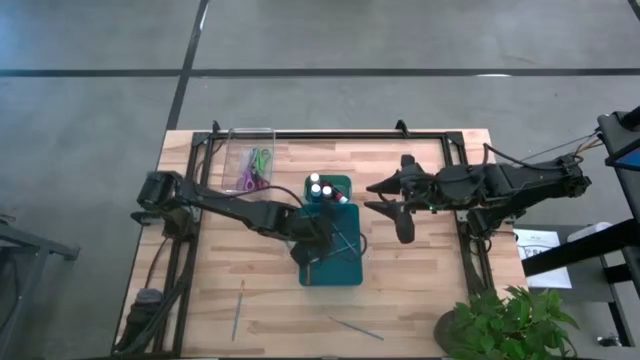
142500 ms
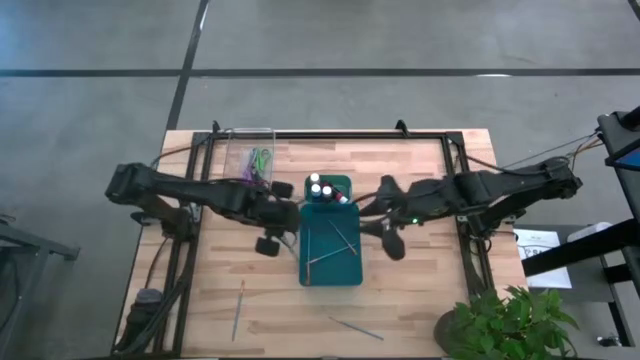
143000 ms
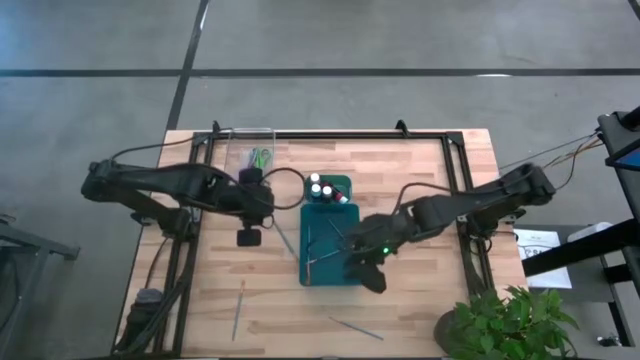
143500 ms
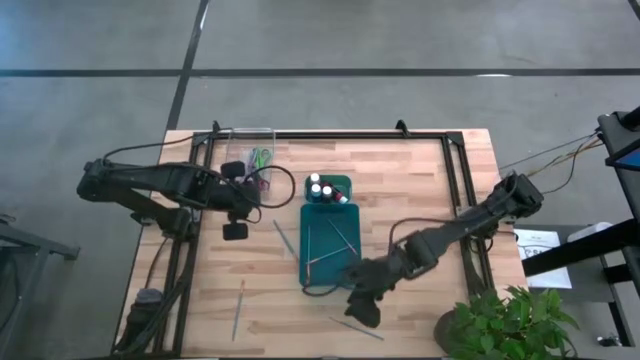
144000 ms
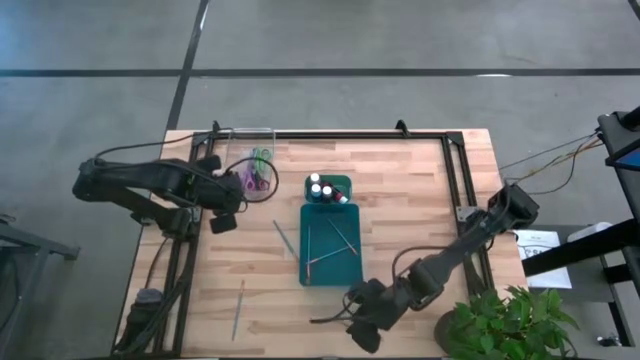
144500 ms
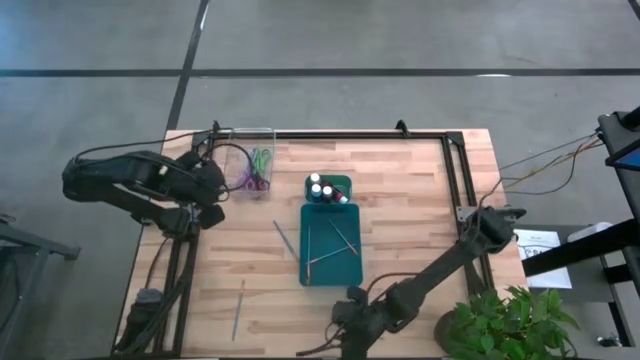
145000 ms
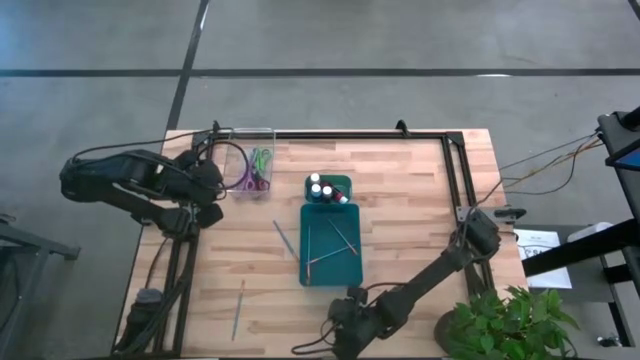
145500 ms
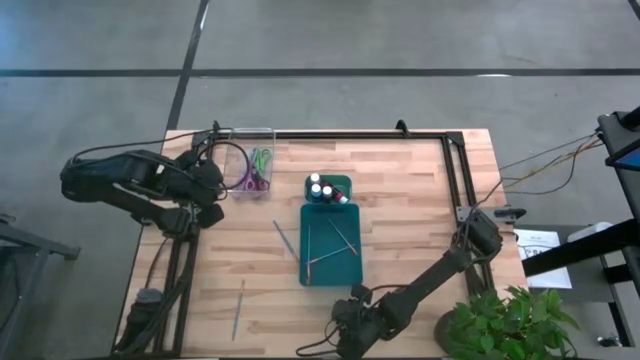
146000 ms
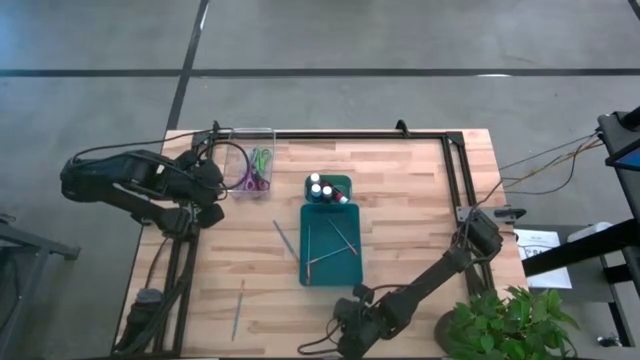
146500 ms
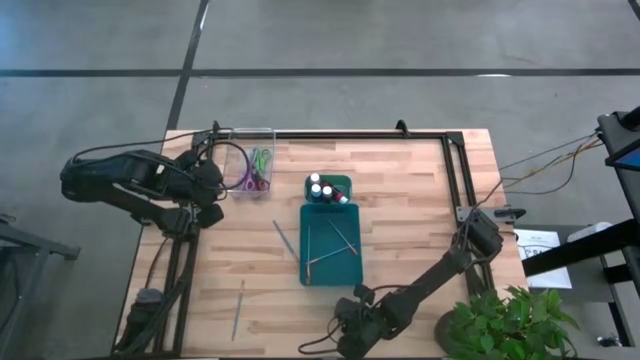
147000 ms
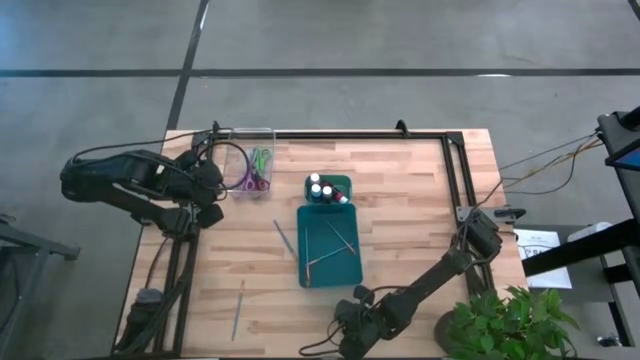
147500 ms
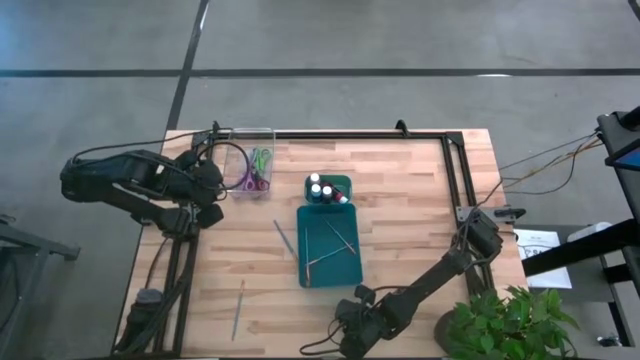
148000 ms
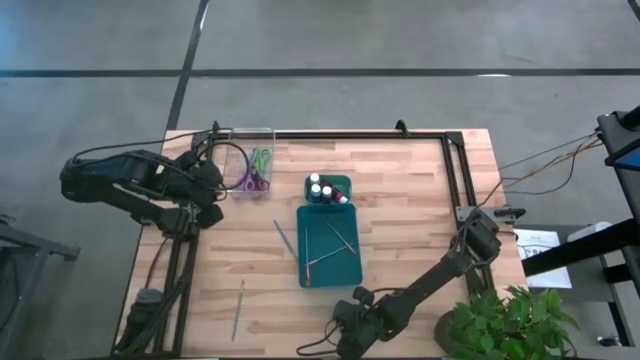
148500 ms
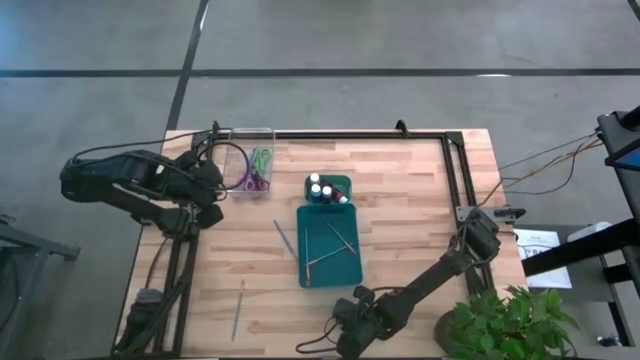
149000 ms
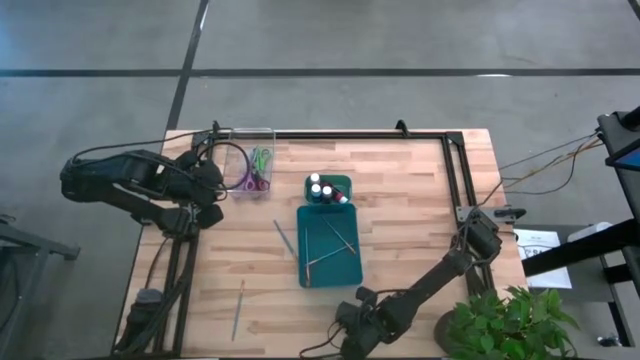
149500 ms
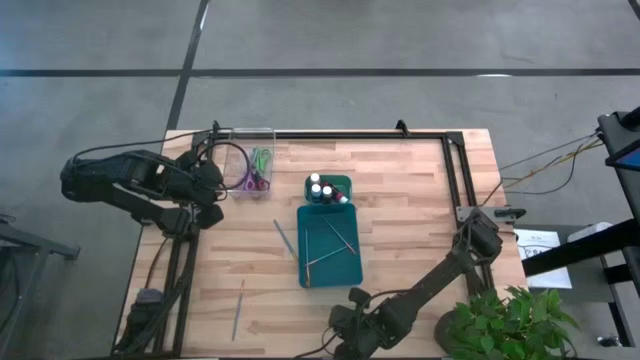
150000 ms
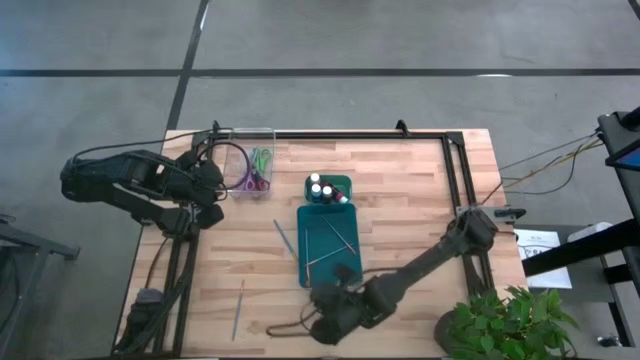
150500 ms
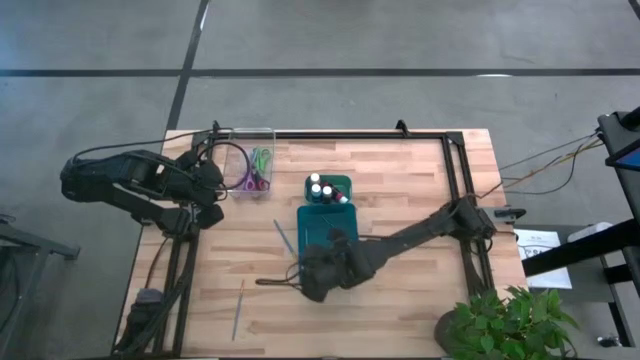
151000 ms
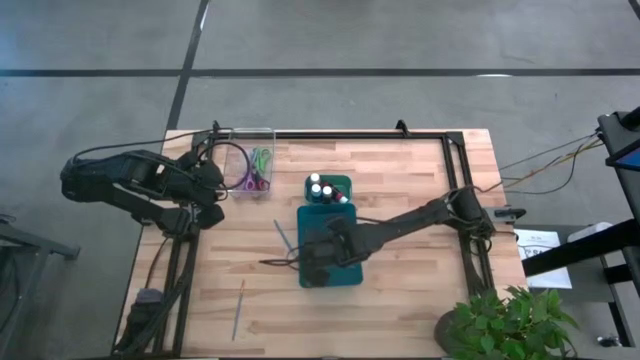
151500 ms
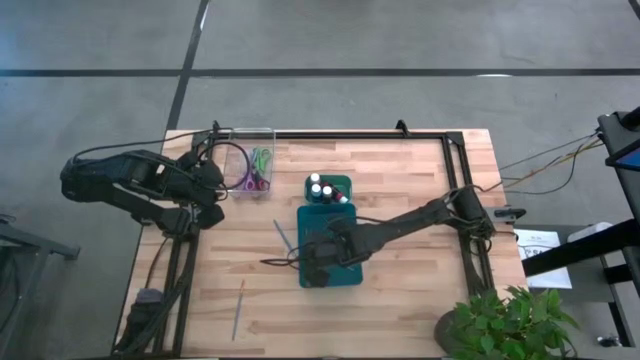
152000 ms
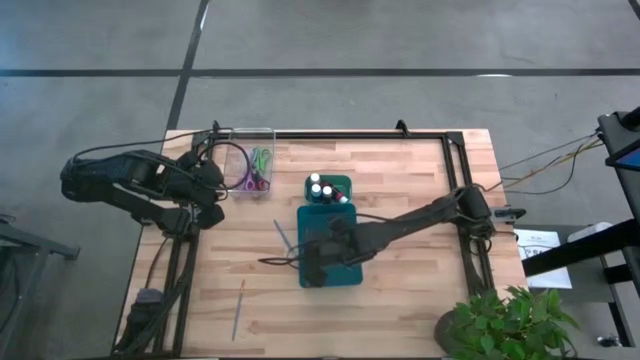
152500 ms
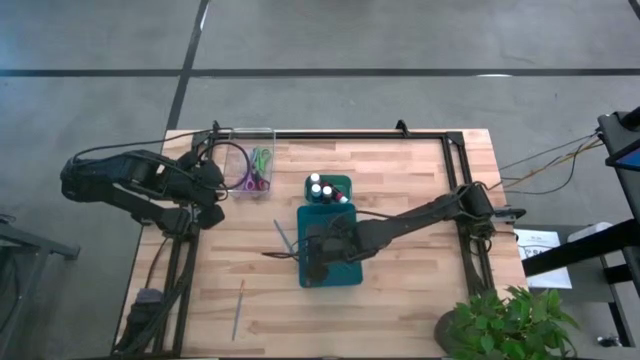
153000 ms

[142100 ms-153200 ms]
Task: Pick & Place Paint Supplies
Put the blue paintbrush into the blue bin

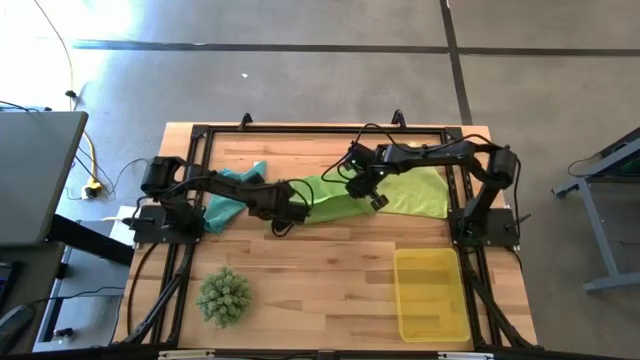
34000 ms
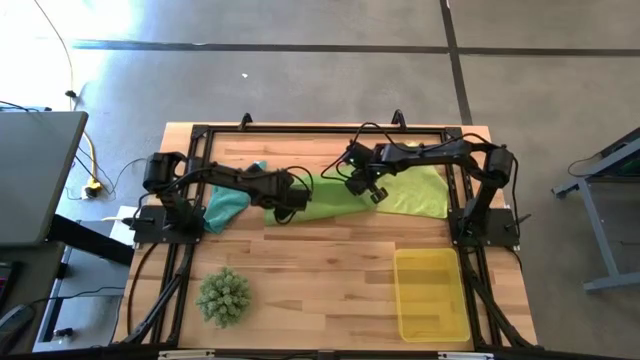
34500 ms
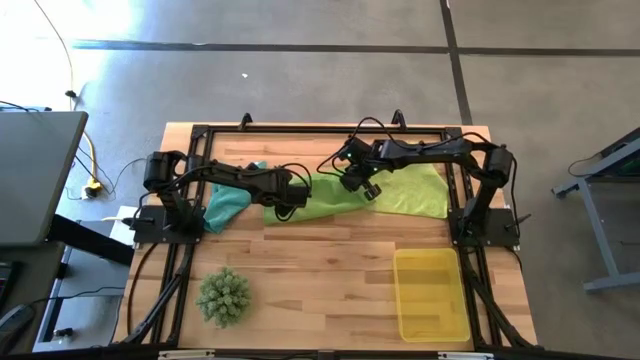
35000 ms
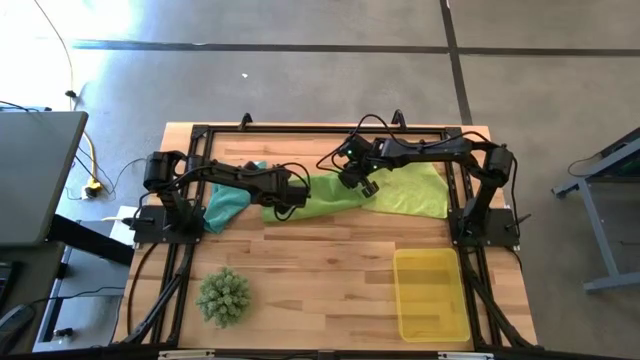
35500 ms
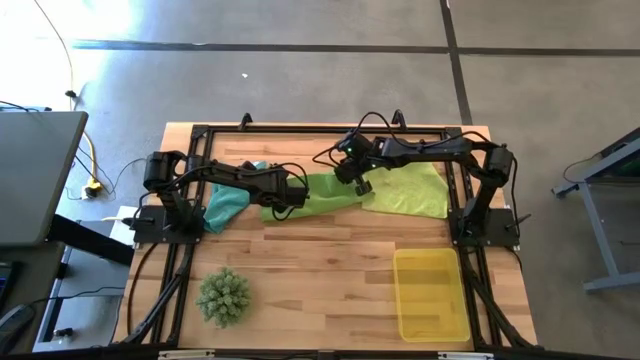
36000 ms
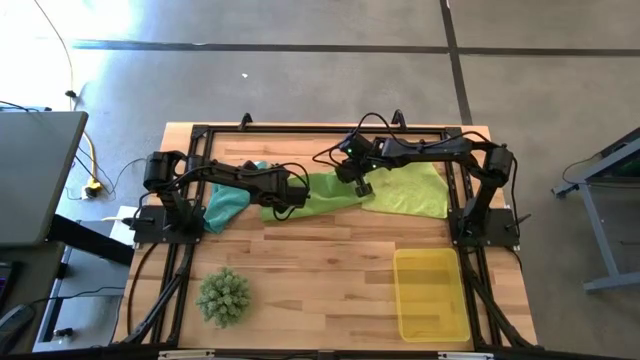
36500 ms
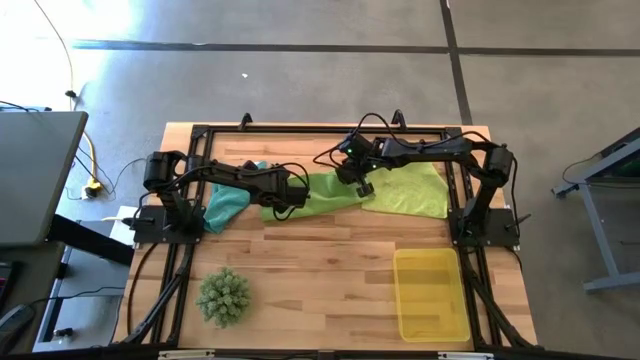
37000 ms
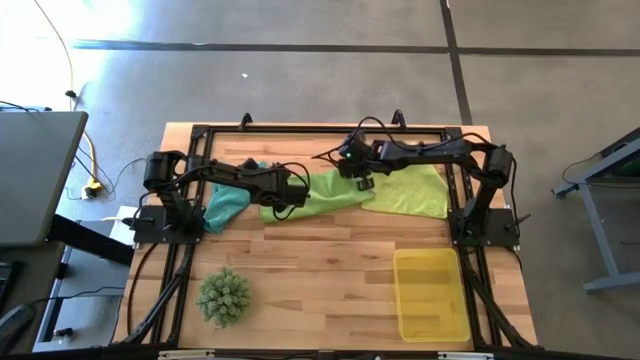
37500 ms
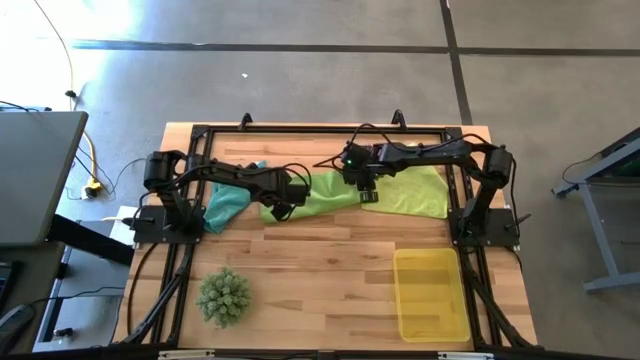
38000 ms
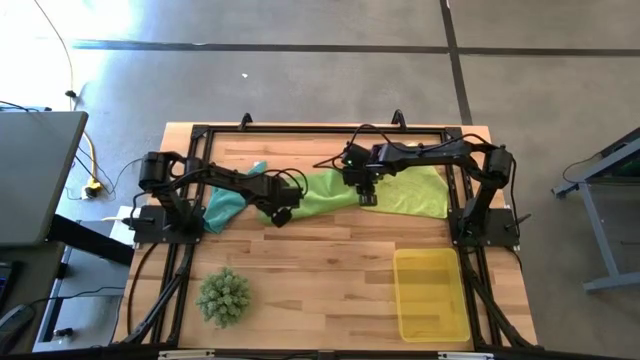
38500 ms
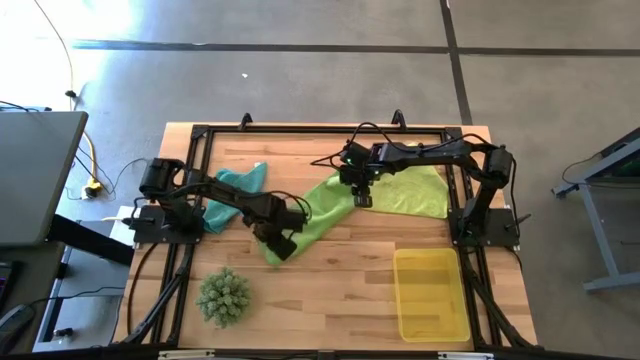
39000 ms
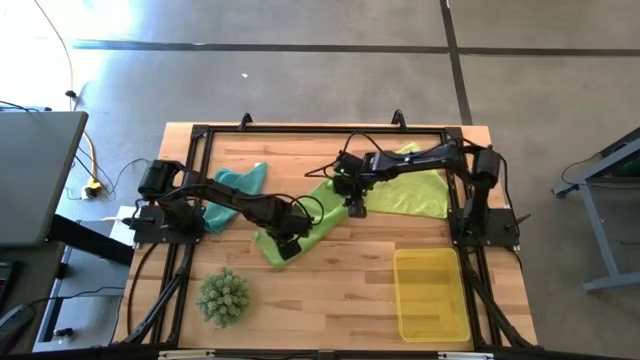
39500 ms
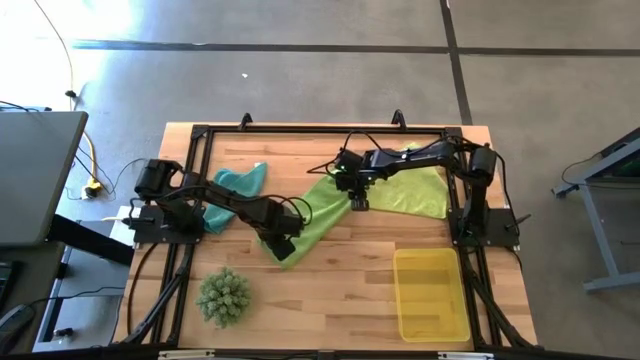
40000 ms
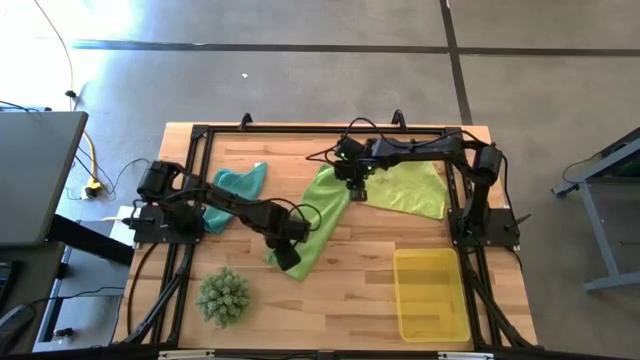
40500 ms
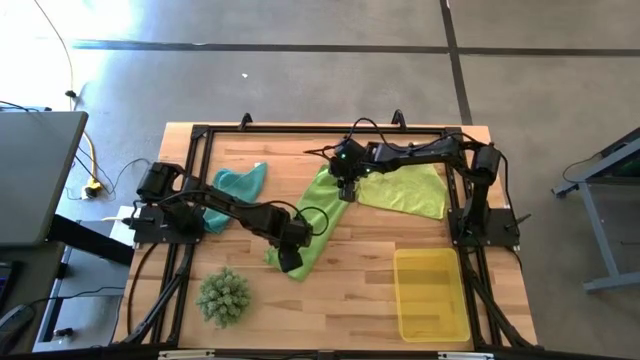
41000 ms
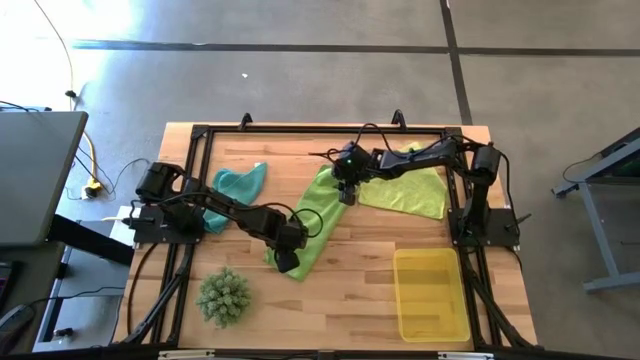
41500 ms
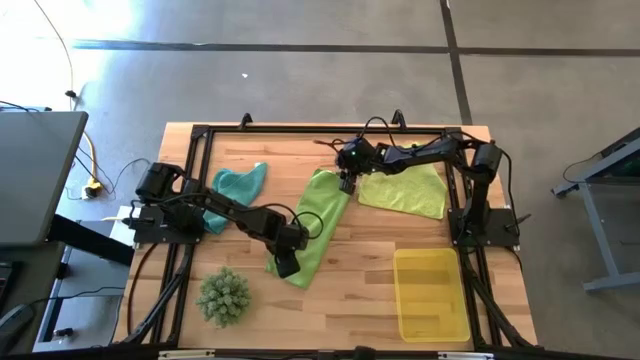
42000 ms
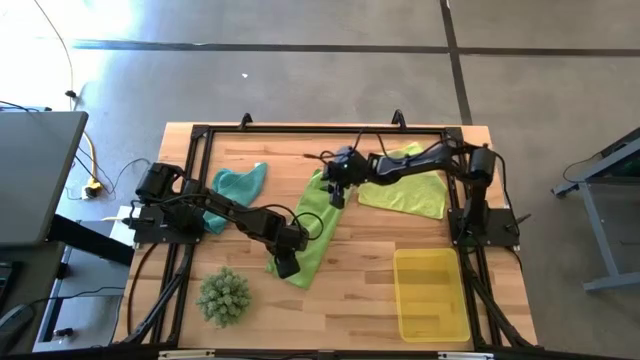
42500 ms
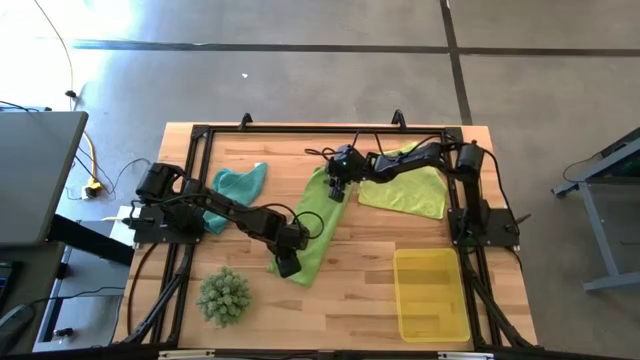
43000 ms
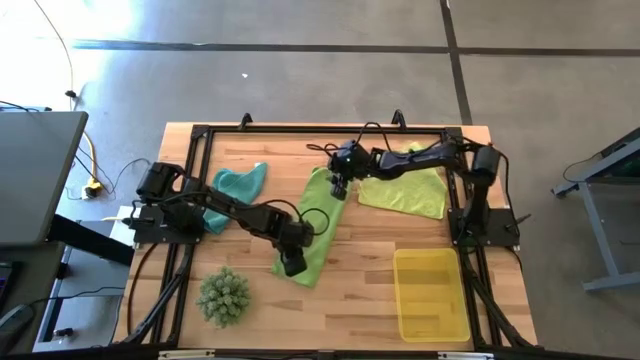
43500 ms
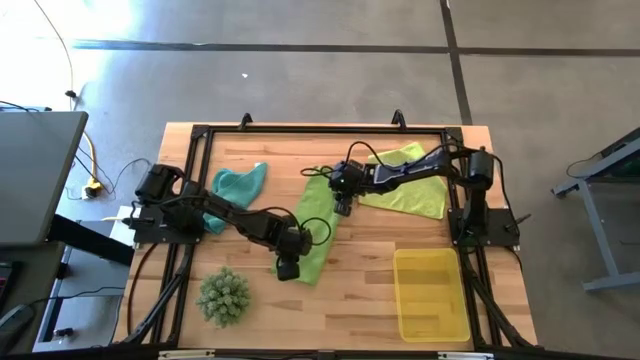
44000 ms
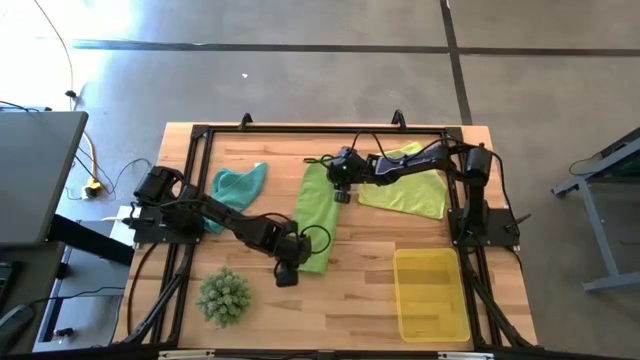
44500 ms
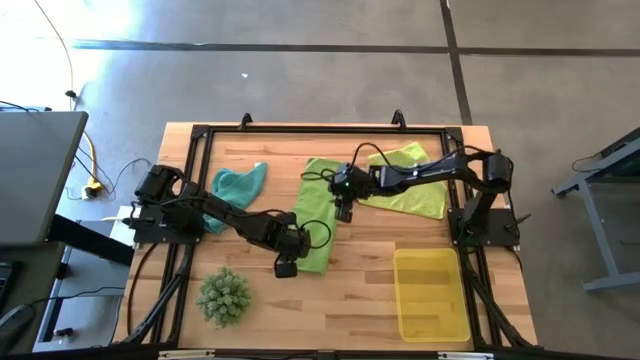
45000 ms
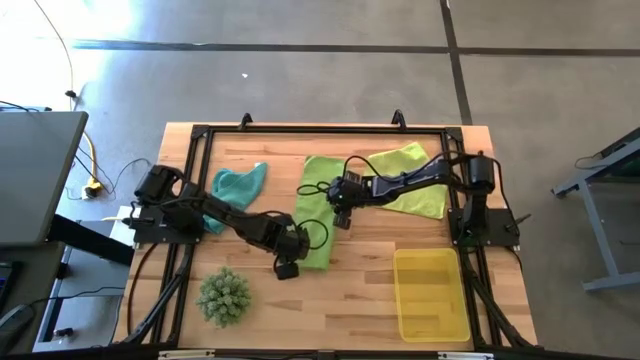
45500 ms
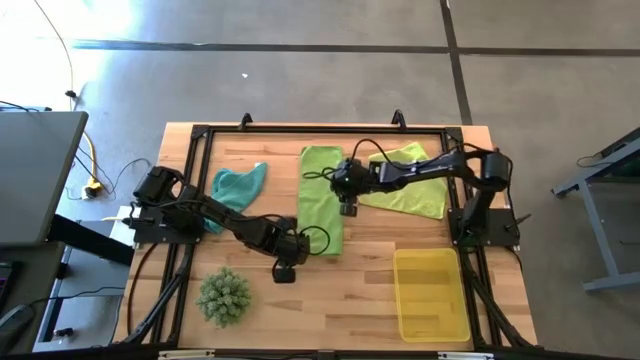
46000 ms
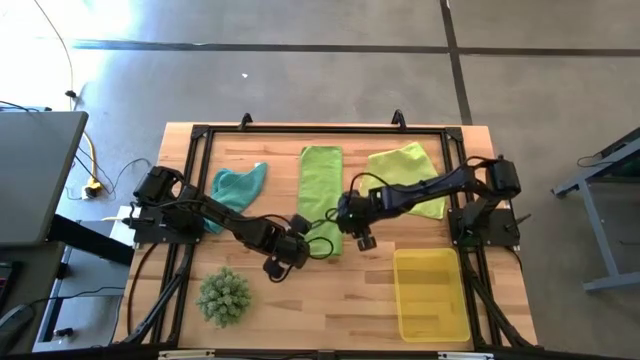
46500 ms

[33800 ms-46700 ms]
Task: Roll microfiber towels into tight, uniform cylinder then place into a basket
Fold the green microfiber cloth
